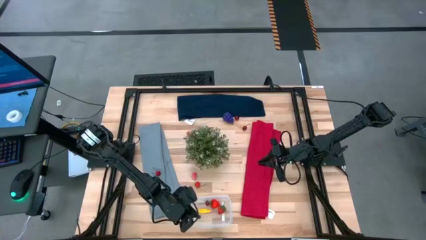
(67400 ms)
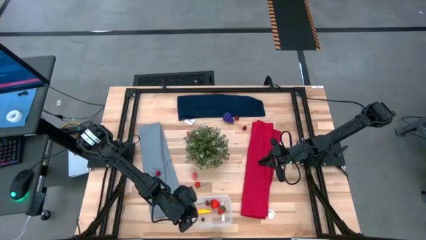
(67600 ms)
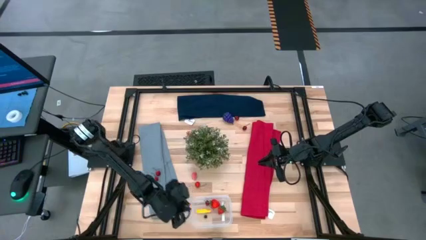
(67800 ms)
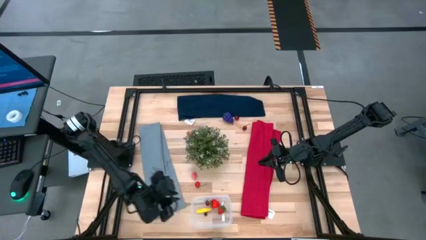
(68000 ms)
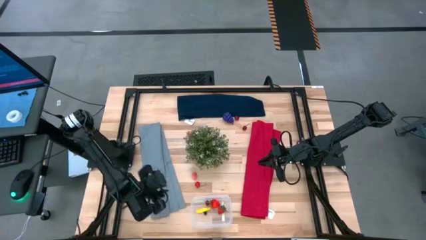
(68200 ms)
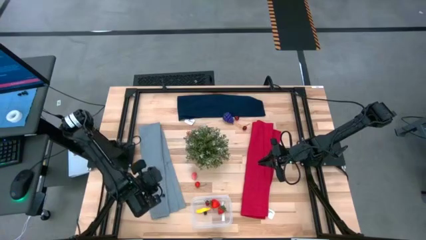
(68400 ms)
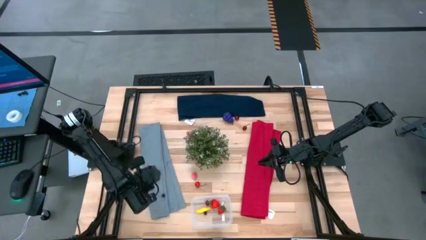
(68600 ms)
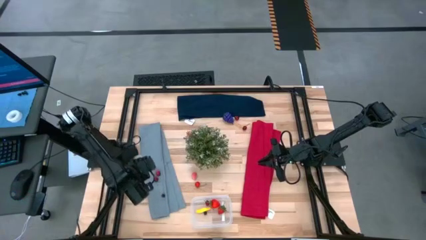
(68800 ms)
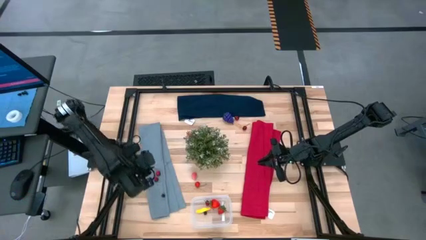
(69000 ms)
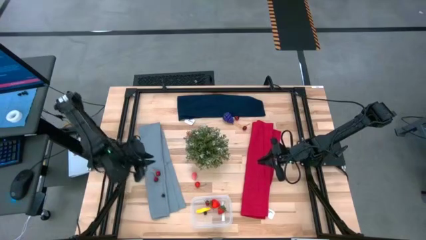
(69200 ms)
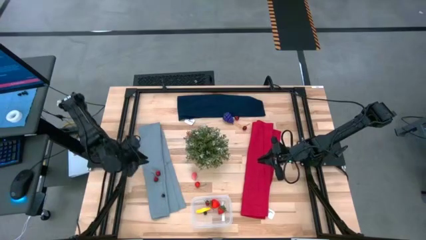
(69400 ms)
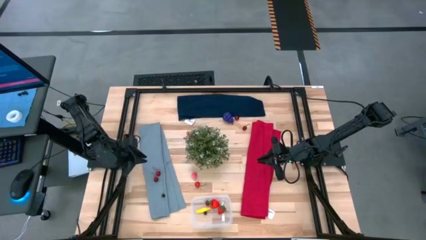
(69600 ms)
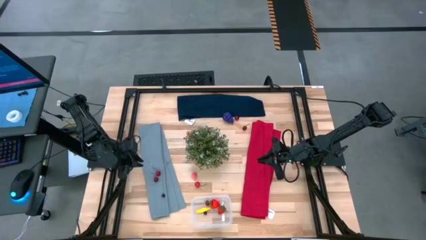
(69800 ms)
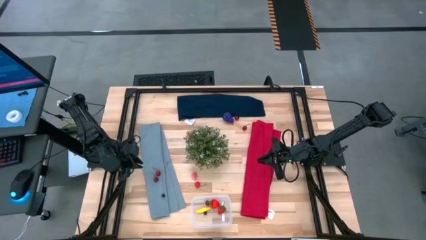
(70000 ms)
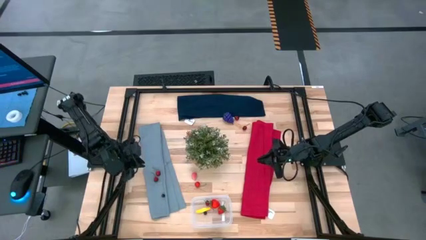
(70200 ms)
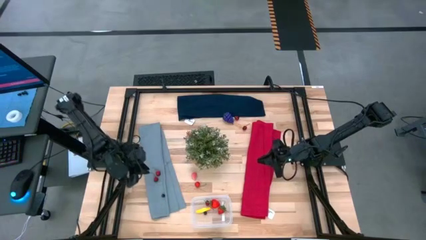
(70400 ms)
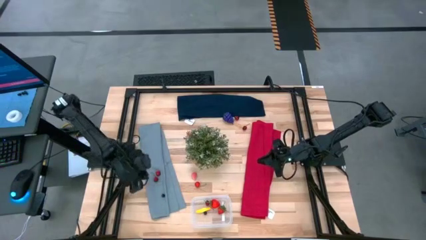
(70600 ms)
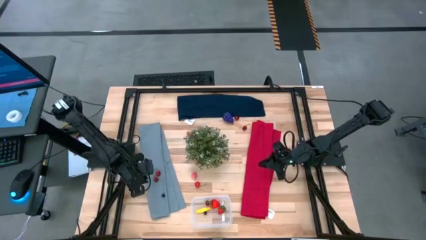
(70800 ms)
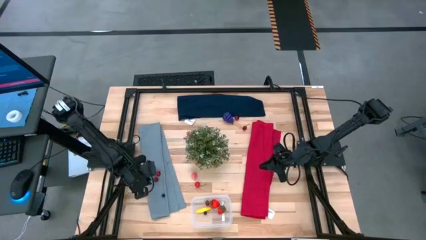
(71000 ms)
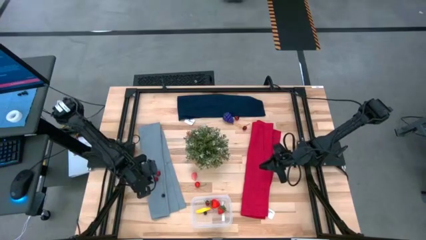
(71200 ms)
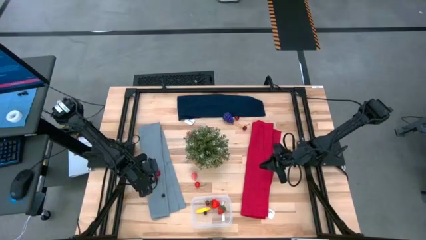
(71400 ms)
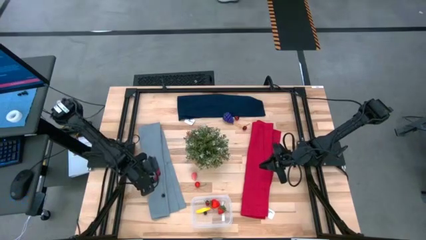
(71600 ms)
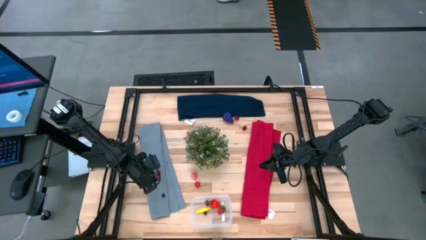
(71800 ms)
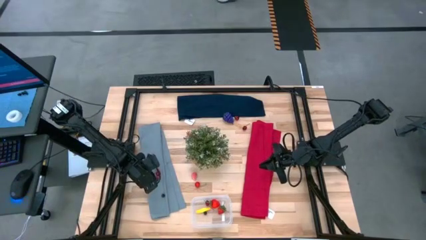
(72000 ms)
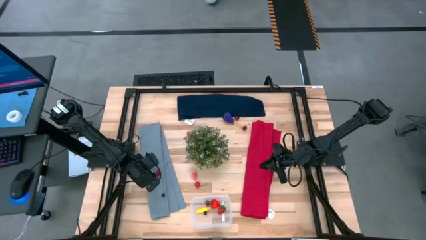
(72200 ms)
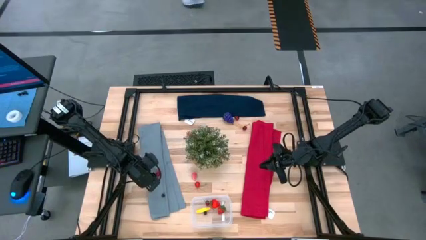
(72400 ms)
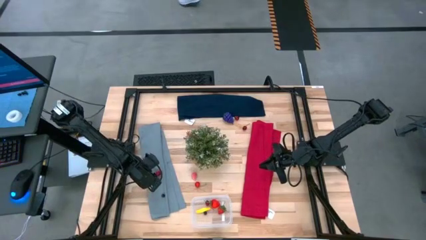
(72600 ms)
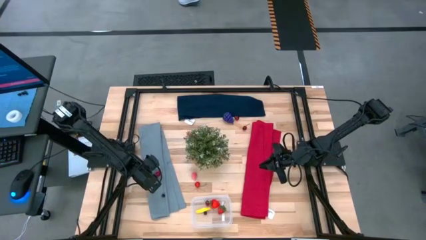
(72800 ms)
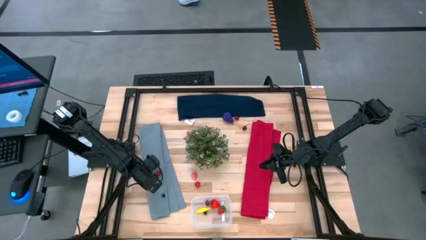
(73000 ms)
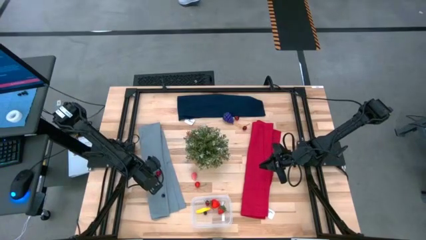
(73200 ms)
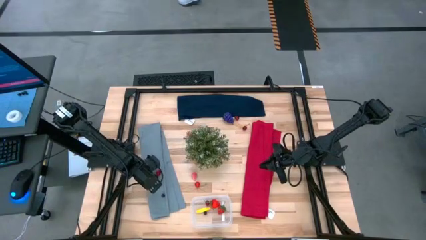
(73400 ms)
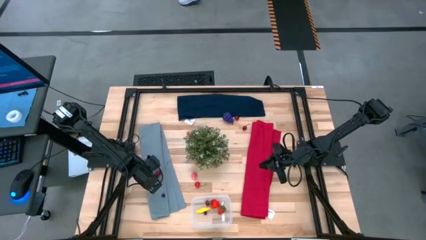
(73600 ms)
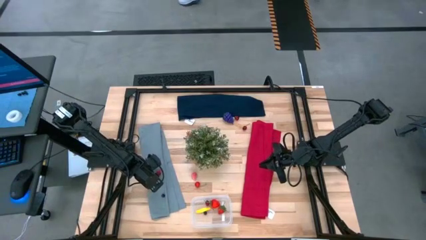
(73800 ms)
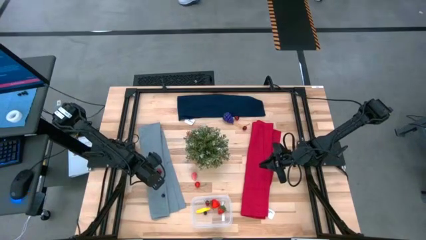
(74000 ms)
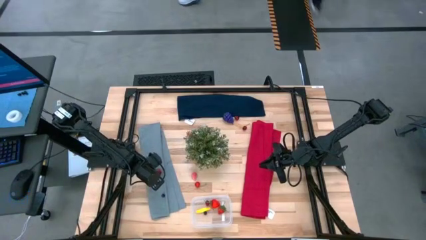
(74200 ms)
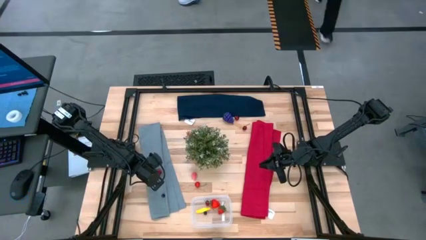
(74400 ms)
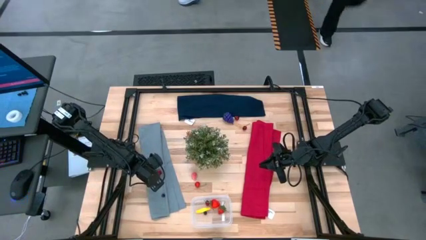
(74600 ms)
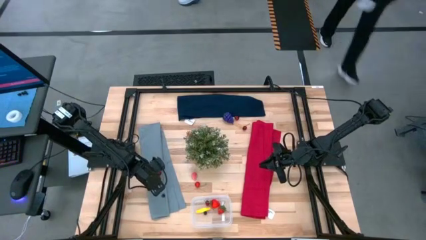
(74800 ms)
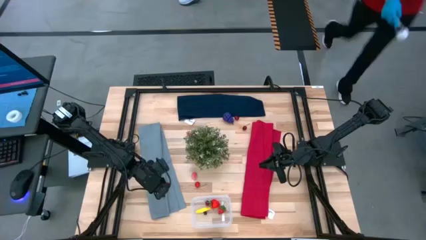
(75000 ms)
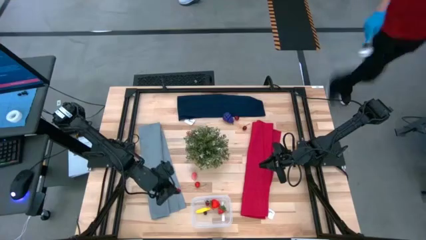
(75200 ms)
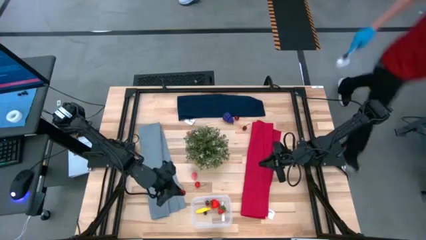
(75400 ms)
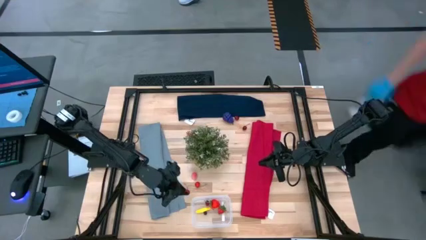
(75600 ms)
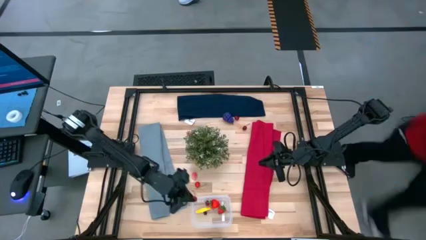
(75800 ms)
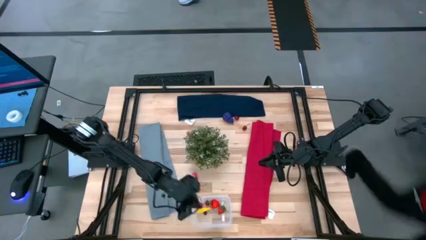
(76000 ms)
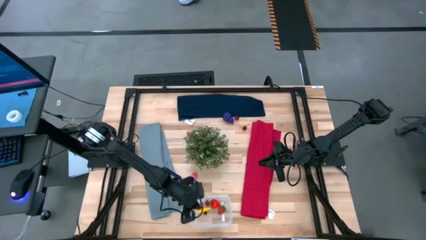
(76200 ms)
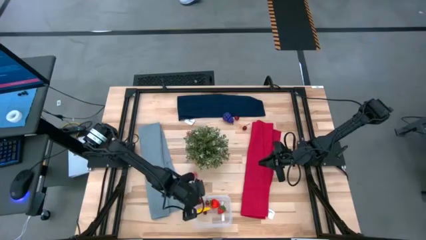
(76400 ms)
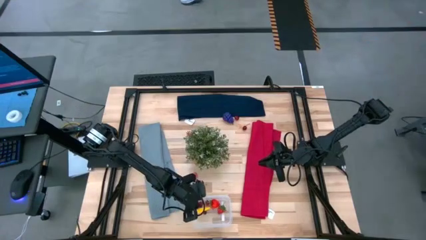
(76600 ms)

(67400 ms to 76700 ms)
Task: Pick and placing Produce into tupperware
Put the cherry into the transparent container

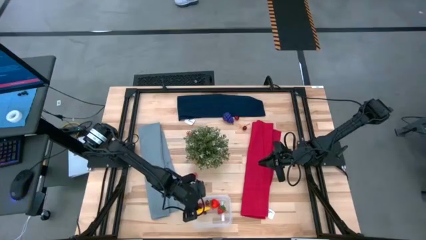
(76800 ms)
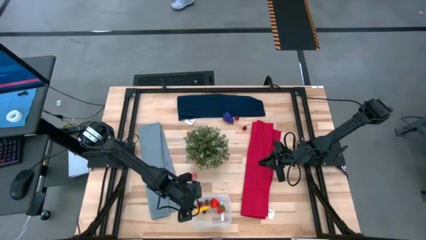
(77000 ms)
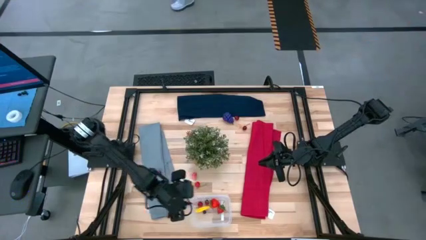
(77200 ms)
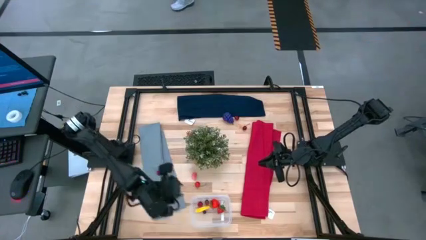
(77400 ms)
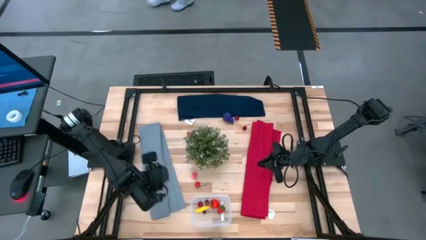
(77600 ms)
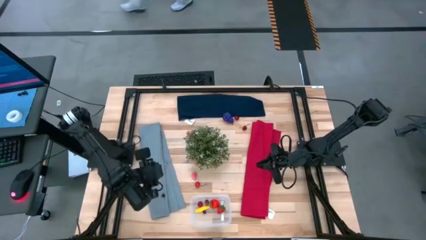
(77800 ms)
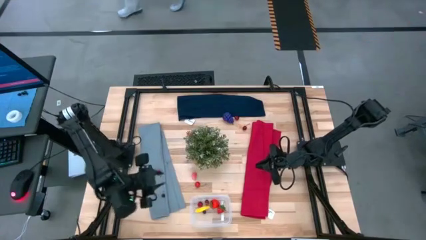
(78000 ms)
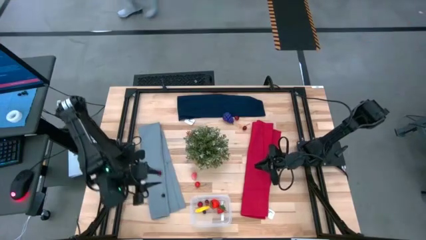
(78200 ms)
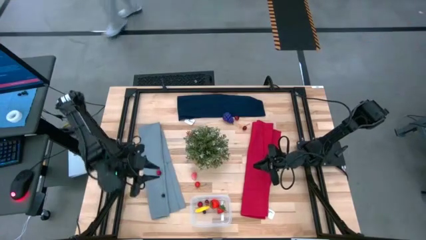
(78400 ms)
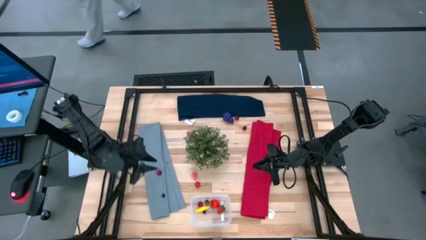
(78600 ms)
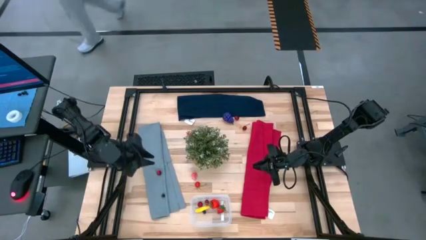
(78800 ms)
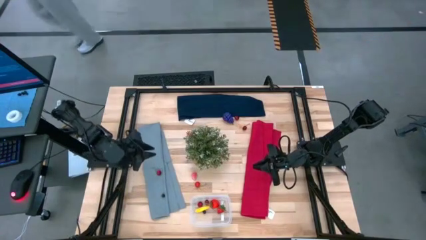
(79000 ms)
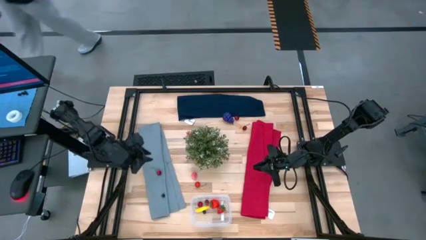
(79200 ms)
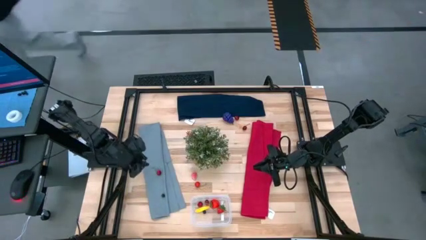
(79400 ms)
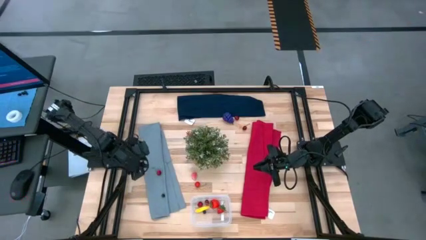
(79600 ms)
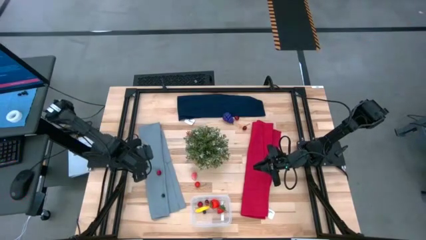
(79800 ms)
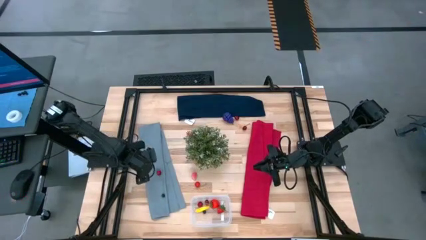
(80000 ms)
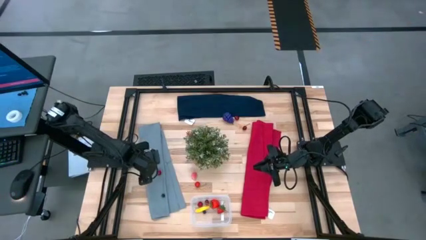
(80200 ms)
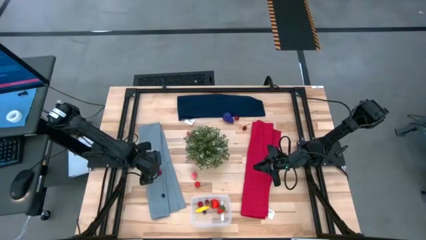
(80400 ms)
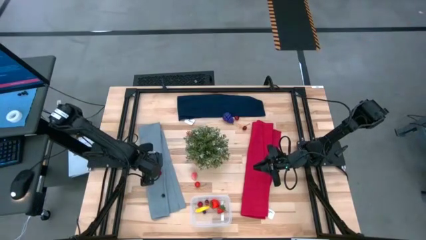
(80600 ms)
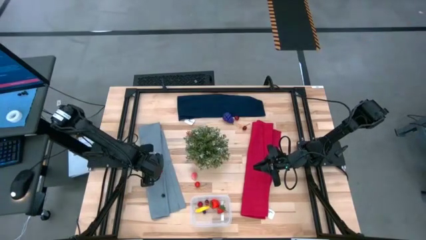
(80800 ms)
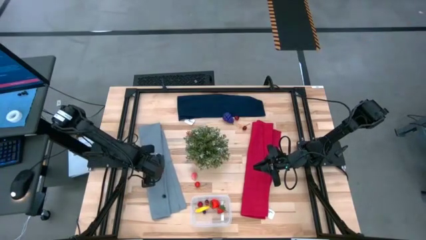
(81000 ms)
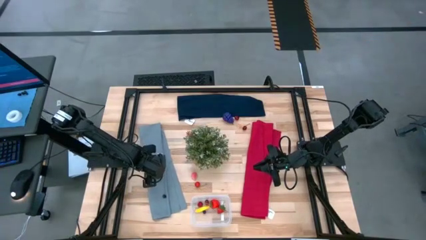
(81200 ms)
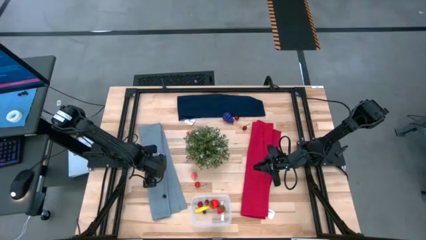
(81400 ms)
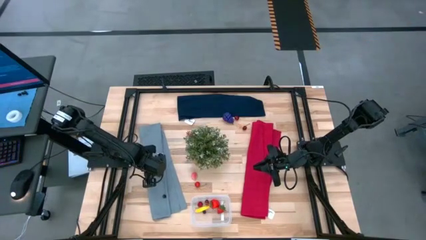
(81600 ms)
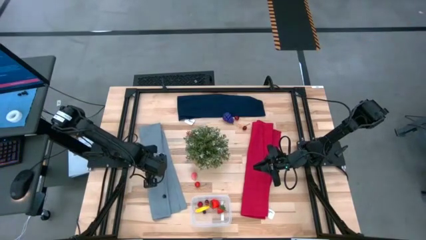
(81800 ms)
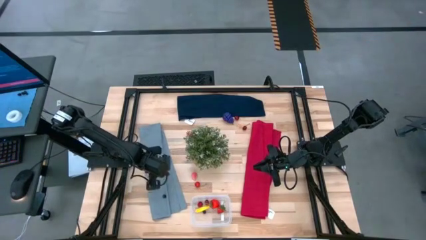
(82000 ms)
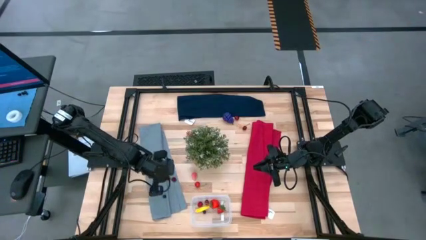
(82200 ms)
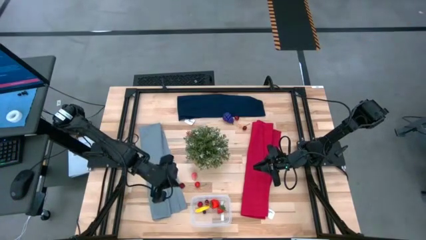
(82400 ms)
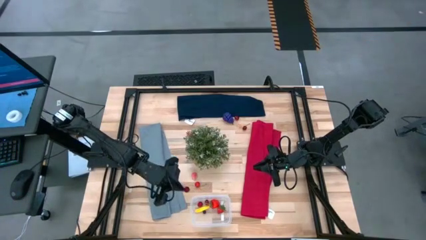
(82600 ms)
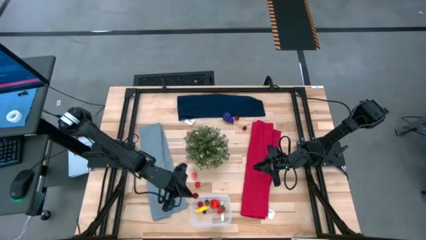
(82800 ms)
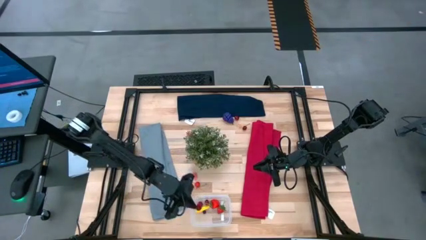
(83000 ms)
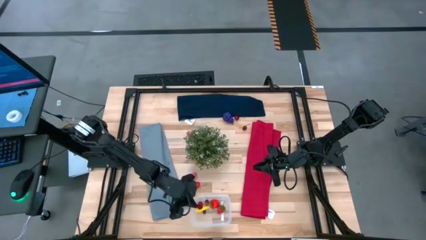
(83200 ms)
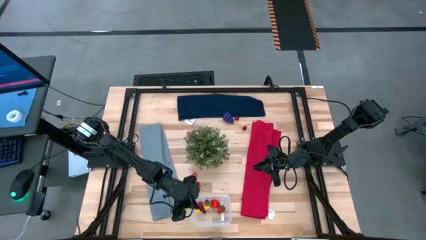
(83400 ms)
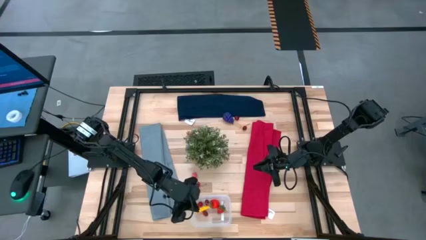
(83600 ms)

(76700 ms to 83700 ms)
Put the cherry into the transparent container
